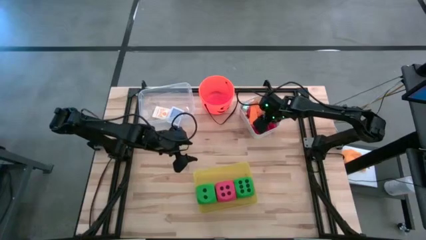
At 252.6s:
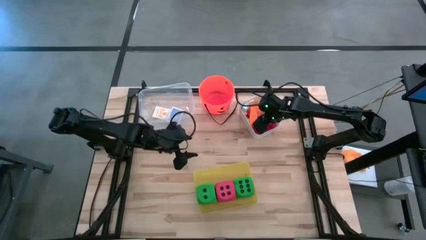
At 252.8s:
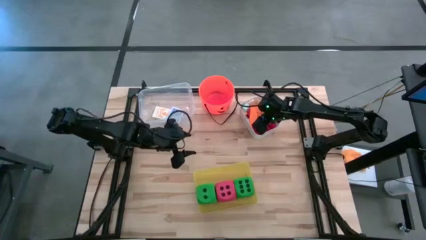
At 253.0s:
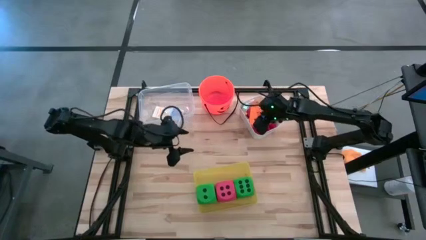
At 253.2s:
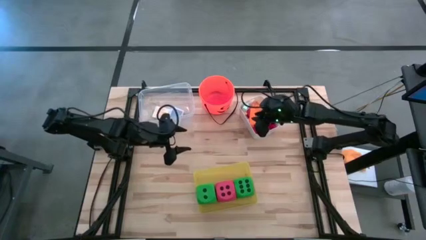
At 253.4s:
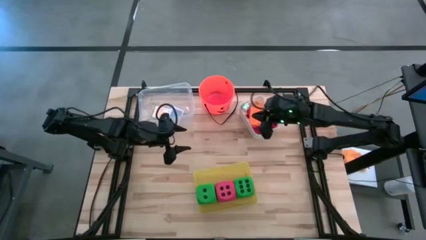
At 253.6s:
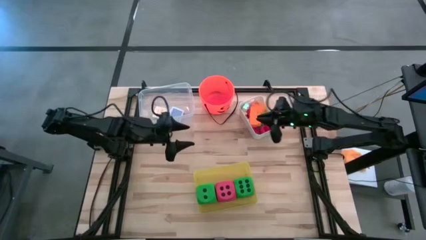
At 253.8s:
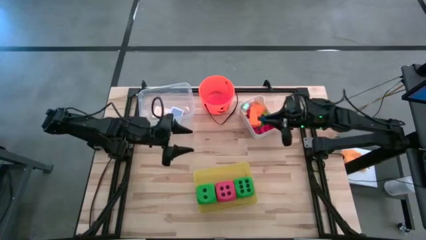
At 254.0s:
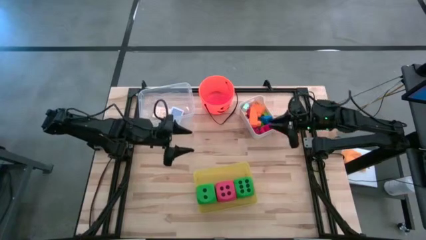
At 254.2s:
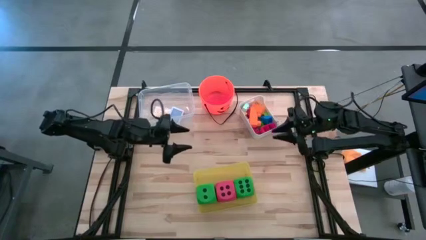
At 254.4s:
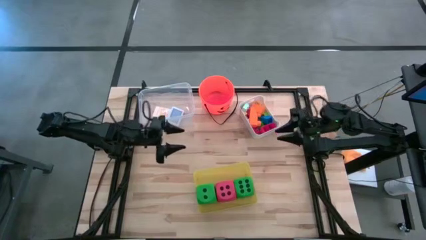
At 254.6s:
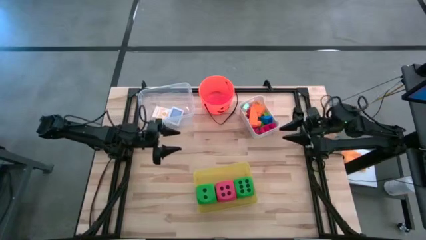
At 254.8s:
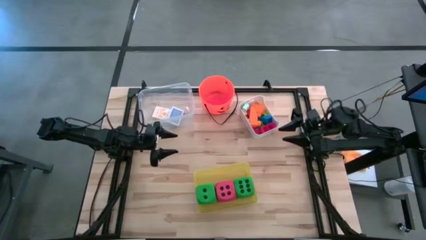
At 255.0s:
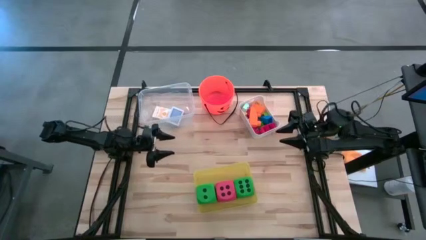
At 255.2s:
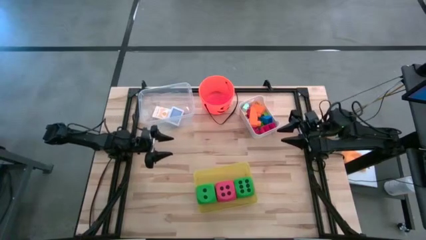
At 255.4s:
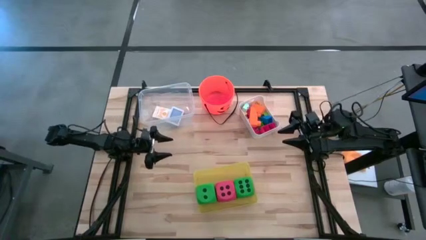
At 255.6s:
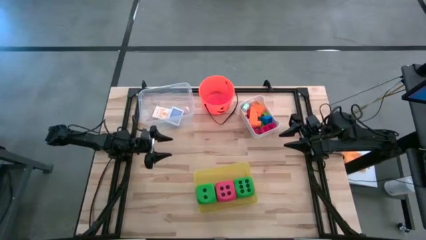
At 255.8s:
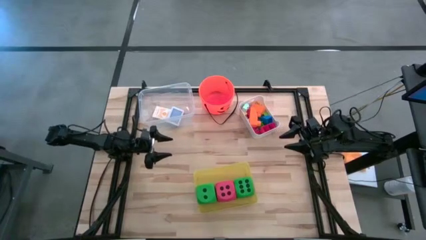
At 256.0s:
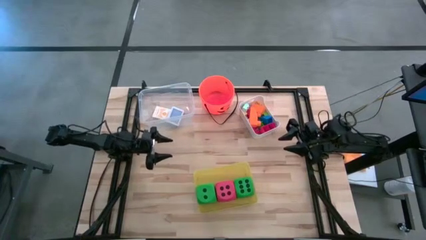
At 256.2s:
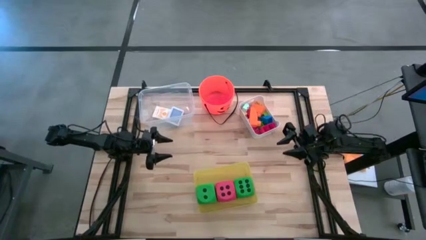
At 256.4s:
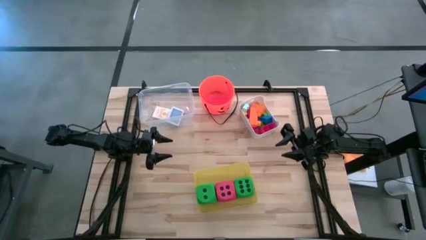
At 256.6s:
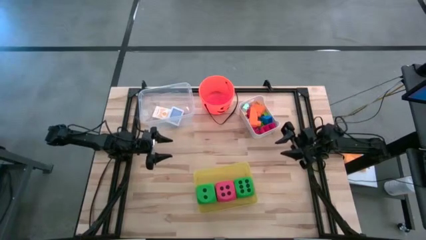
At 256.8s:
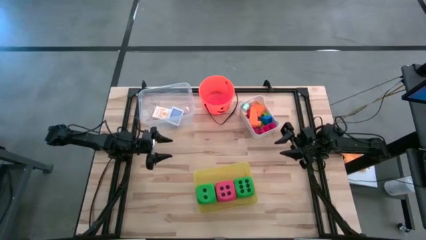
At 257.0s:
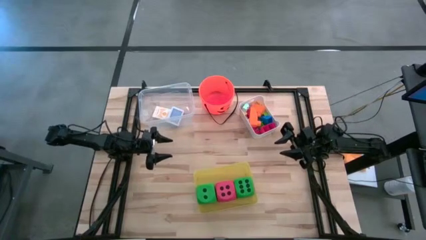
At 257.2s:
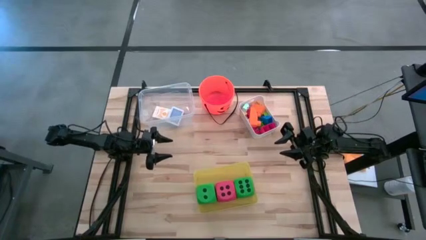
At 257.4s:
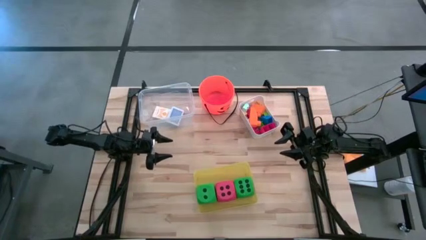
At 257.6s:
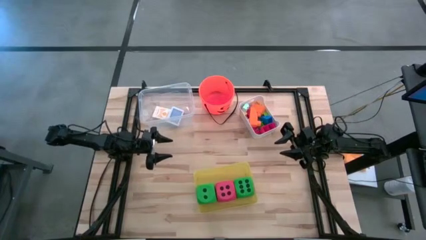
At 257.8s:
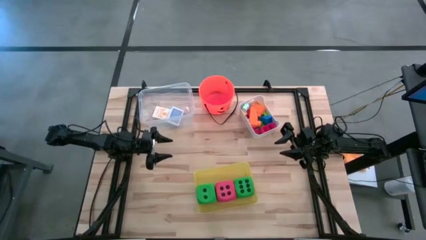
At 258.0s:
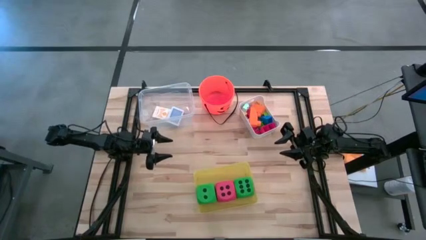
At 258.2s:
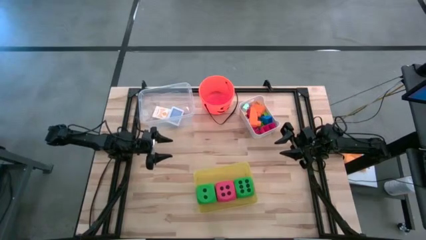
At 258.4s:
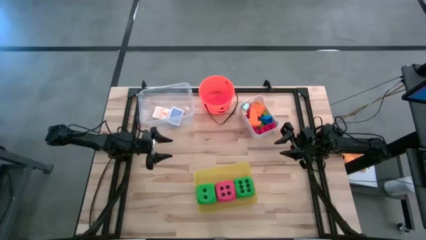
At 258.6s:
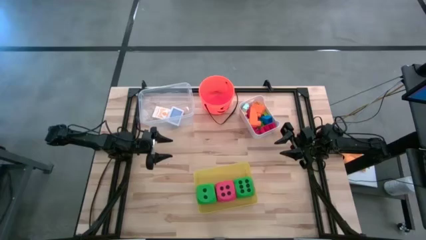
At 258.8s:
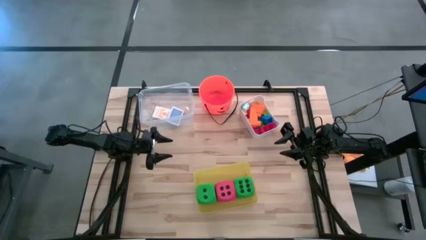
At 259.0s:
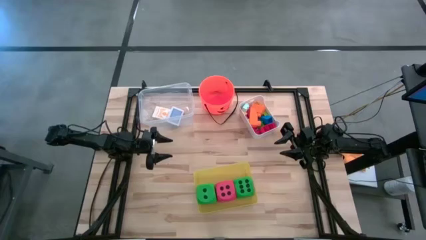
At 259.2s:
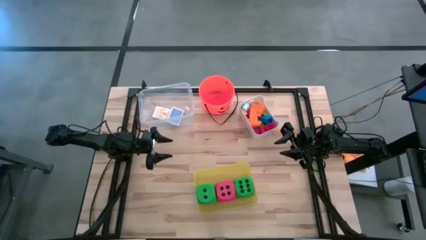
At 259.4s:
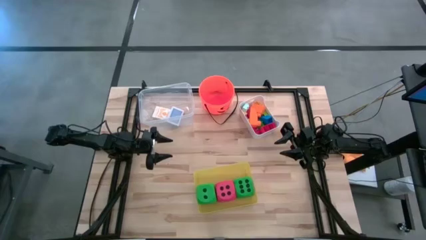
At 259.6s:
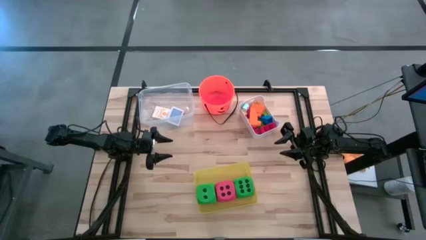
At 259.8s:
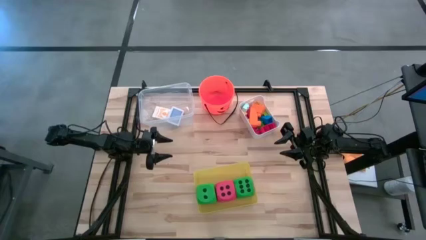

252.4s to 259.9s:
Task: Pick & Place Toys
Return to Home Position

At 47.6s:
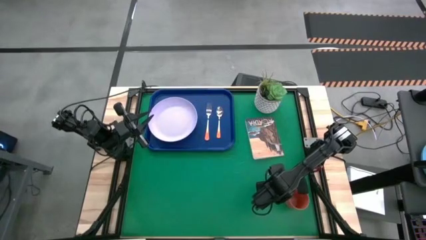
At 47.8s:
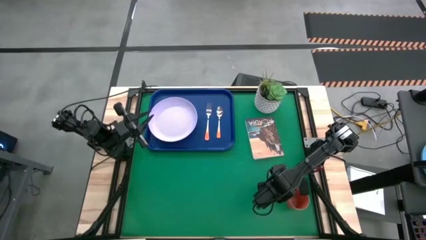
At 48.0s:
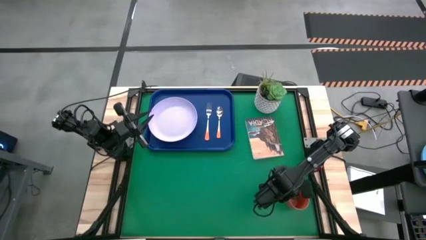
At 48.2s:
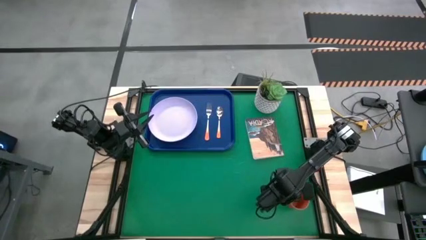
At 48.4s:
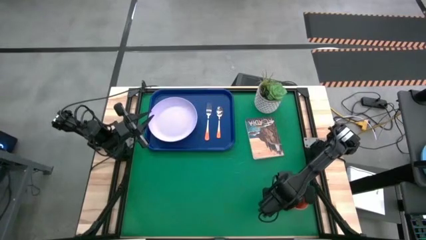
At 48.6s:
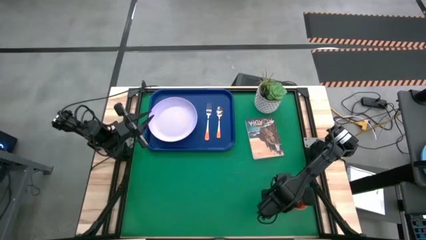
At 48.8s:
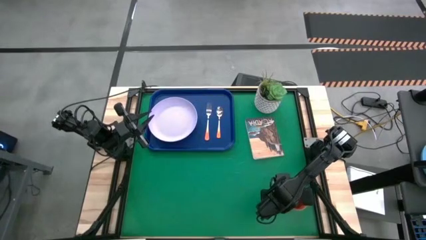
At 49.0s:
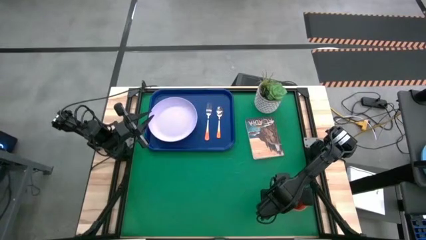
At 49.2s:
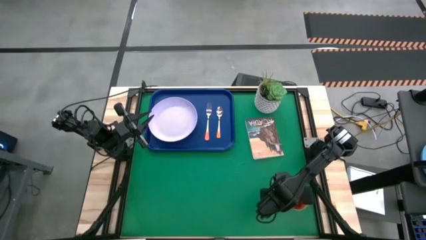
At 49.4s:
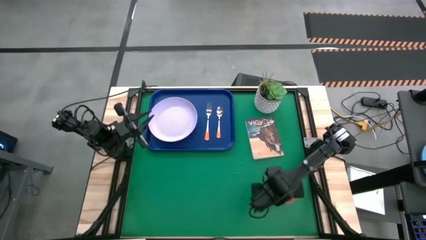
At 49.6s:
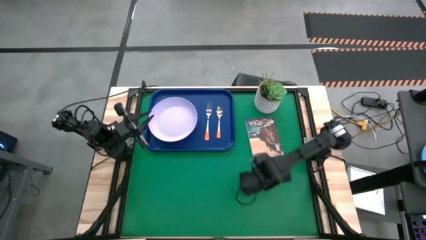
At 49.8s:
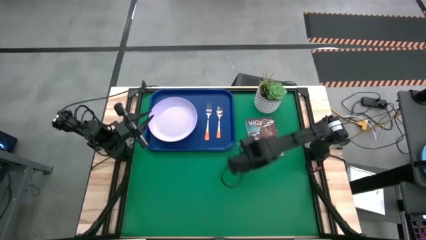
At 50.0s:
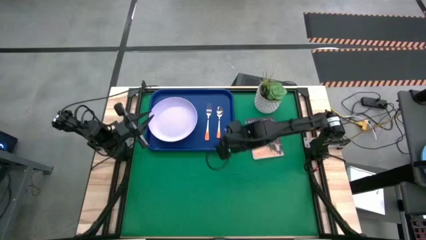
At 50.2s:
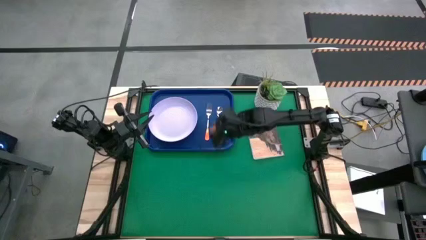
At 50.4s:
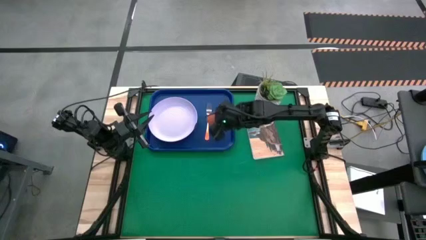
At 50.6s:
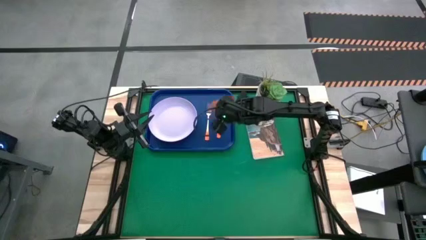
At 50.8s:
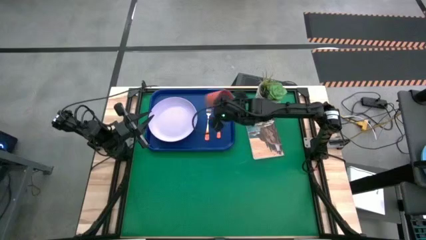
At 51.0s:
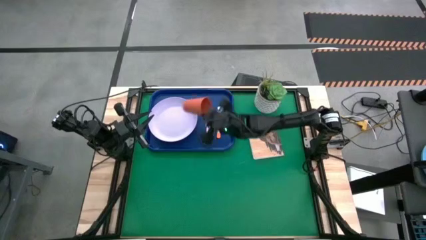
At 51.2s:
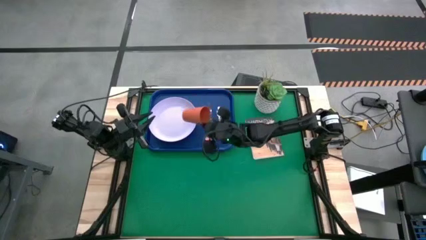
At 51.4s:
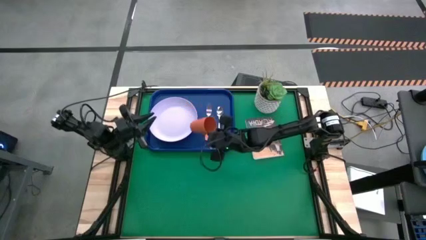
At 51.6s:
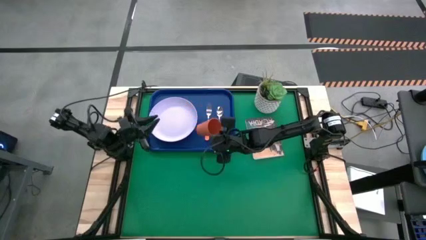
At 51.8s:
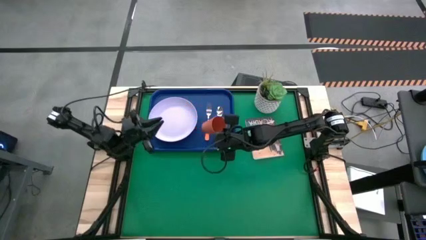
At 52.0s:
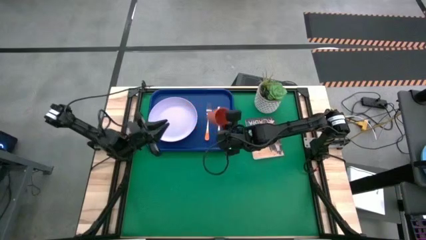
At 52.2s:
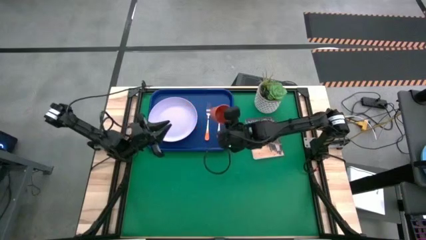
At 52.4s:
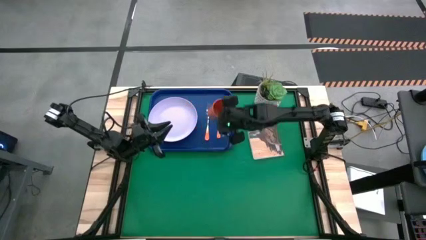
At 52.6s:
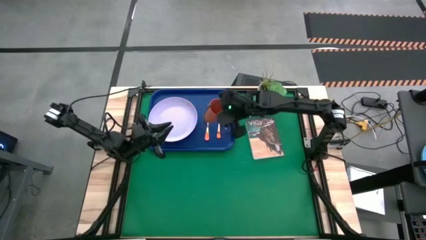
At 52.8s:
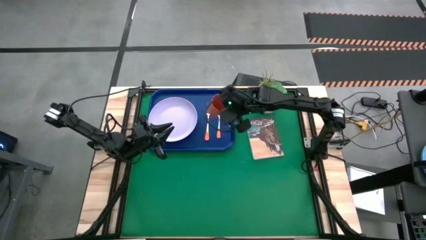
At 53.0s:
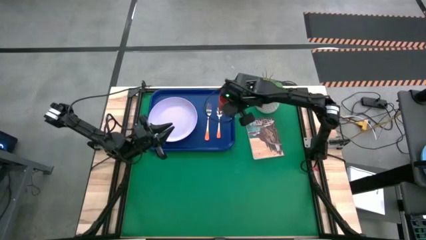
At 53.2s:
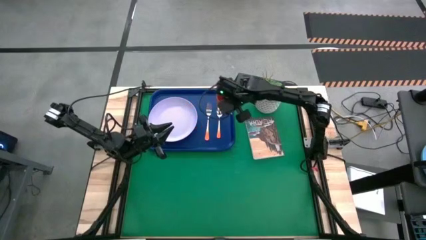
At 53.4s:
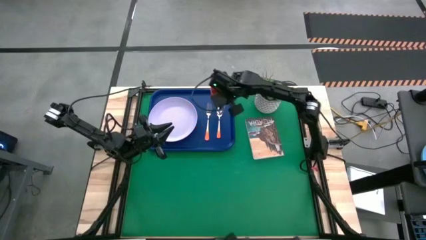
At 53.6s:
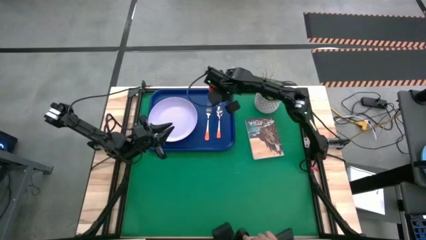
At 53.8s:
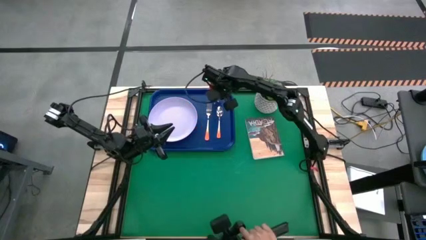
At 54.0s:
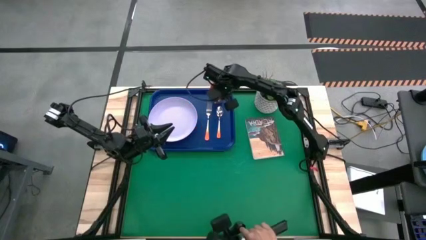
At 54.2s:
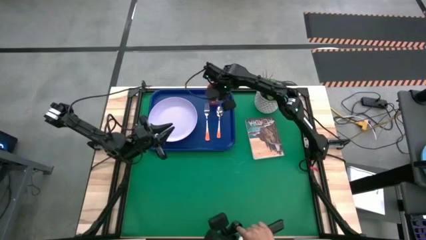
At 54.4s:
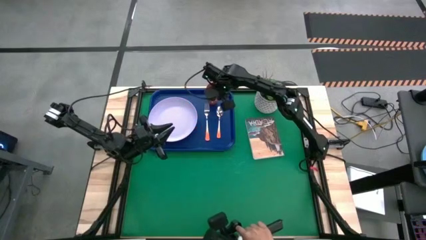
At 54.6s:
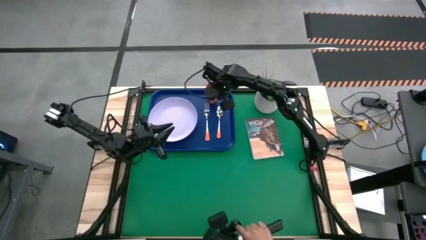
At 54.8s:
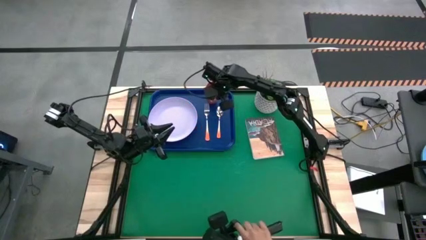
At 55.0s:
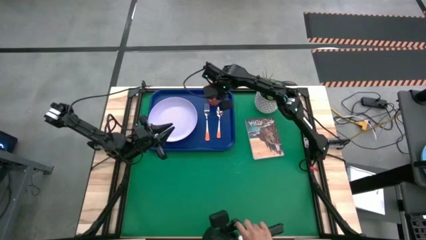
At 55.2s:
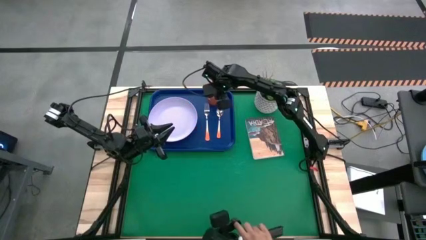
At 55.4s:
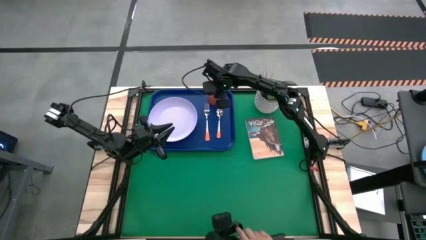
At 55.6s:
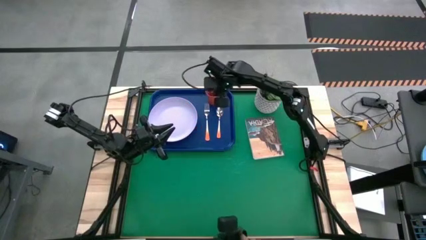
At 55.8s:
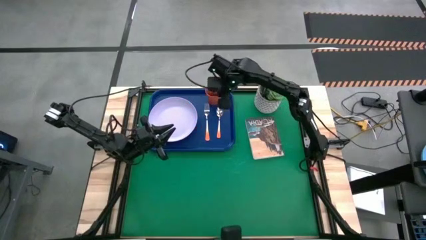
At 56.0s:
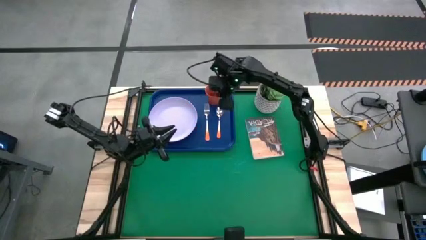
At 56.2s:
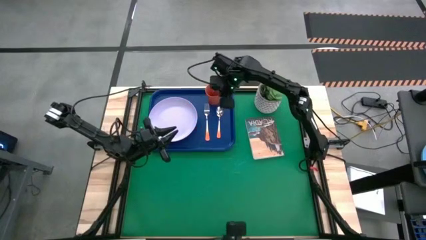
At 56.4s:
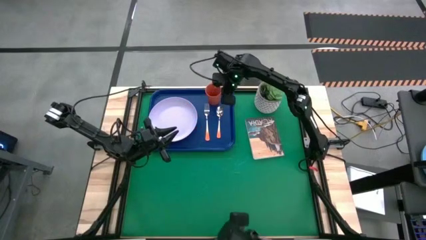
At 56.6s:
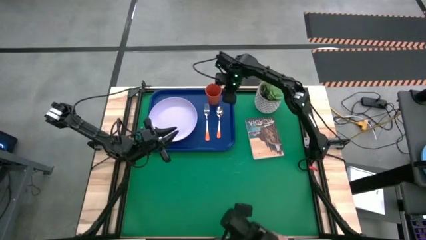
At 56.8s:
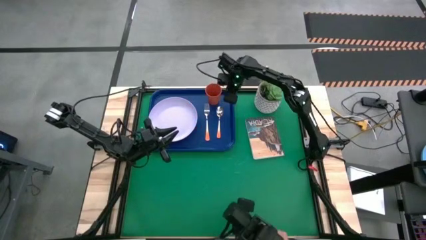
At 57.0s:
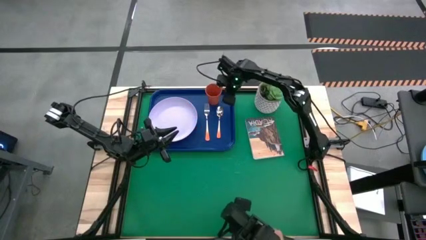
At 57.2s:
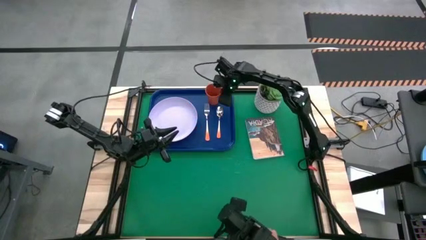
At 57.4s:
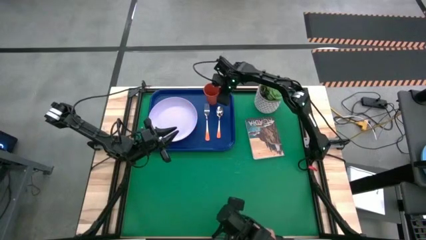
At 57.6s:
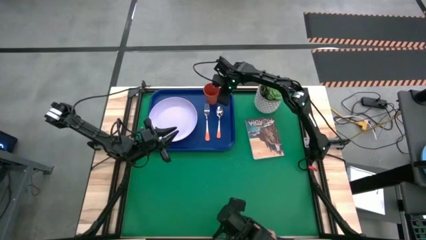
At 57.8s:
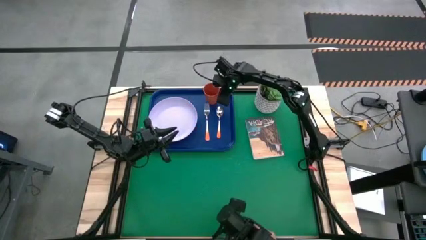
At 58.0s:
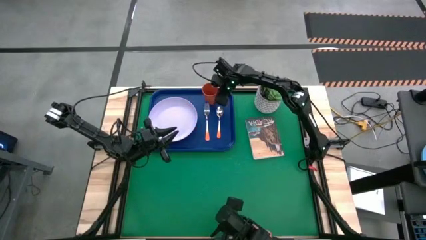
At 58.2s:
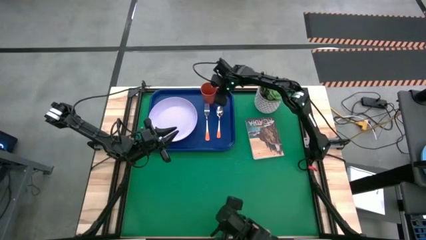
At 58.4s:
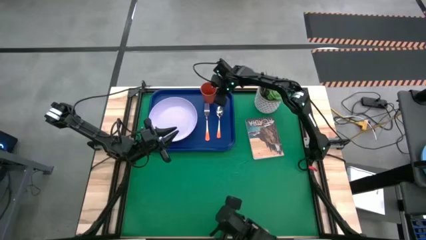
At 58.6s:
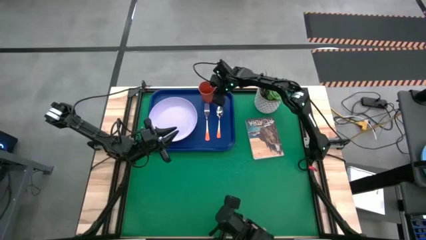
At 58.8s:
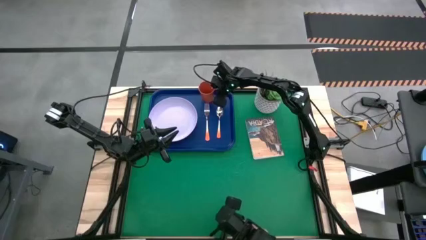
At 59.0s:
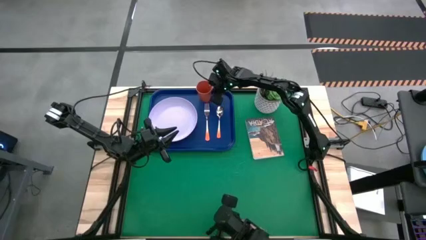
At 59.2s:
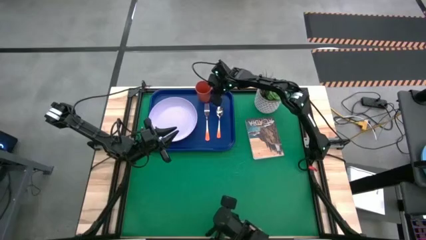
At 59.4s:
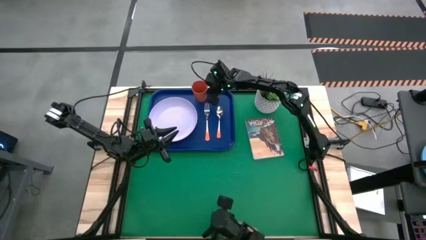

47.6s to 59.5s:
Task: Pick and place plate/cup/fork/spoon on tray
Put the orange cup on the blue serving tray to top right of the white plate
